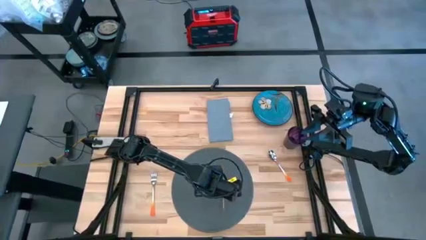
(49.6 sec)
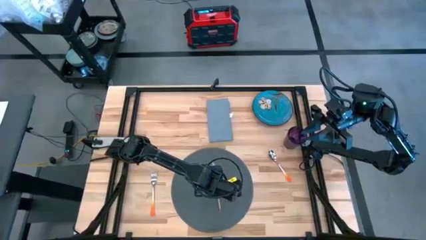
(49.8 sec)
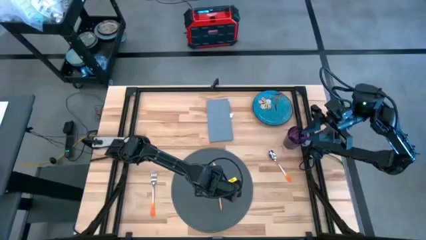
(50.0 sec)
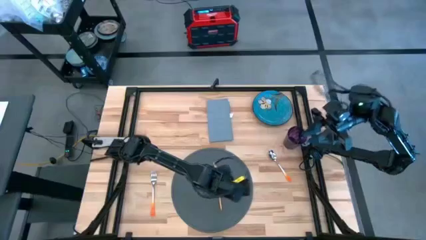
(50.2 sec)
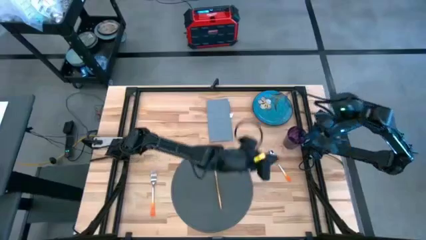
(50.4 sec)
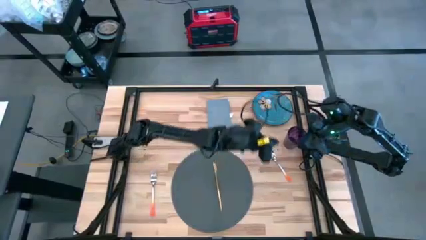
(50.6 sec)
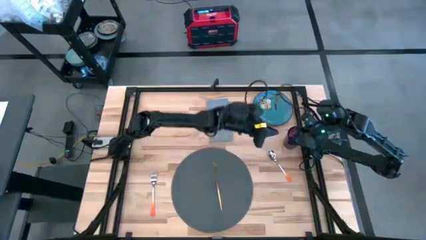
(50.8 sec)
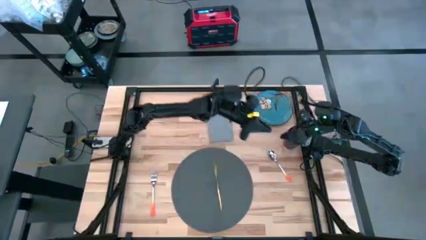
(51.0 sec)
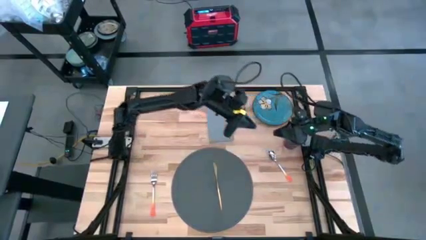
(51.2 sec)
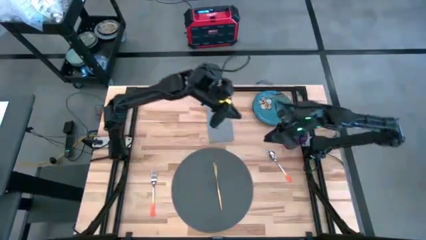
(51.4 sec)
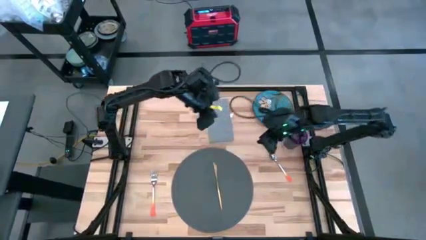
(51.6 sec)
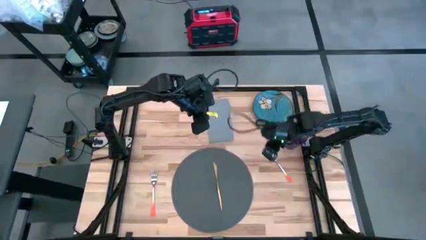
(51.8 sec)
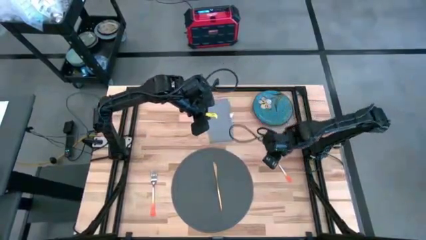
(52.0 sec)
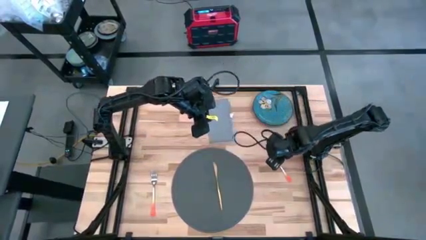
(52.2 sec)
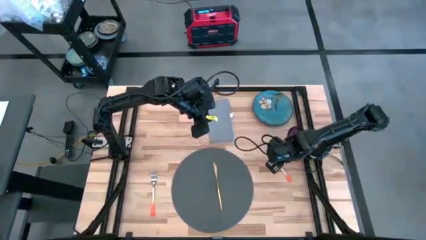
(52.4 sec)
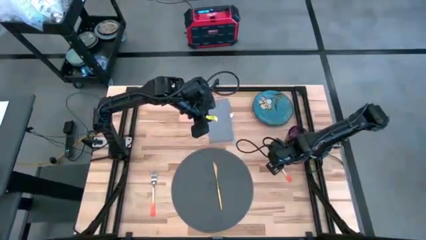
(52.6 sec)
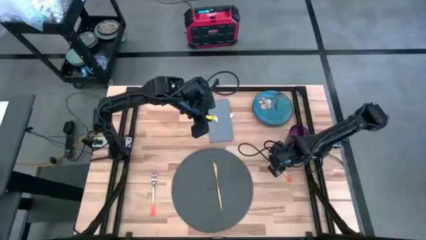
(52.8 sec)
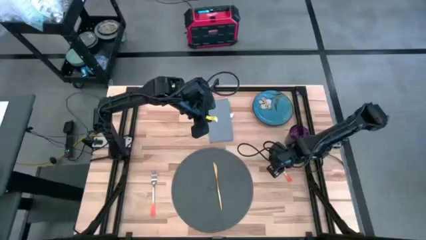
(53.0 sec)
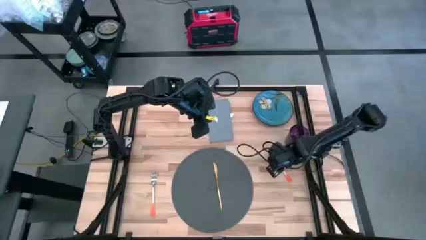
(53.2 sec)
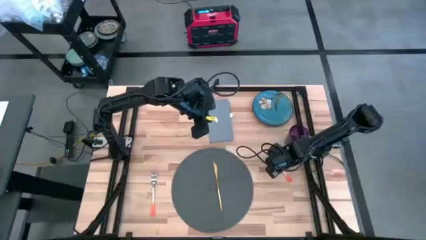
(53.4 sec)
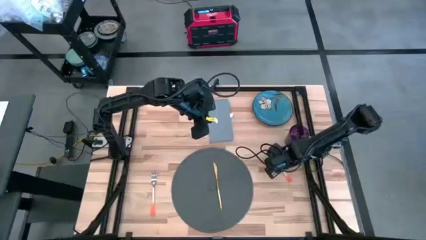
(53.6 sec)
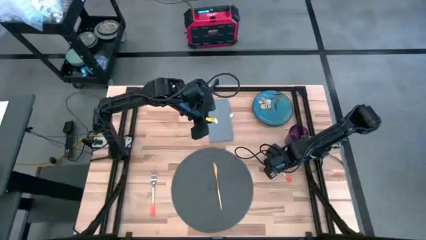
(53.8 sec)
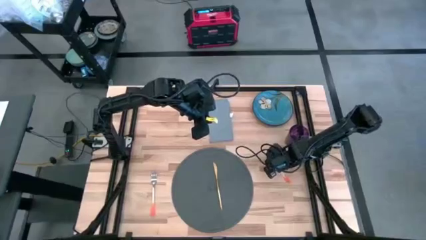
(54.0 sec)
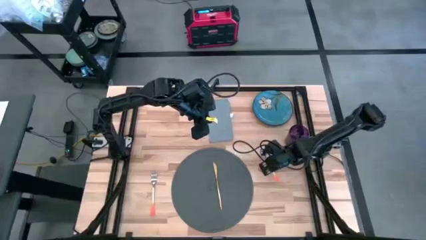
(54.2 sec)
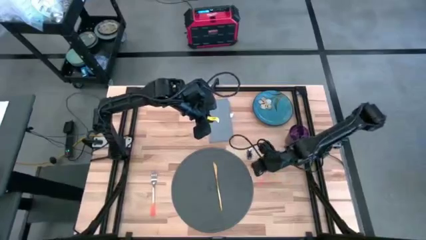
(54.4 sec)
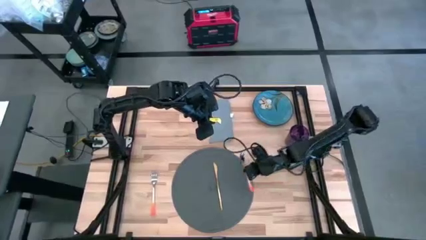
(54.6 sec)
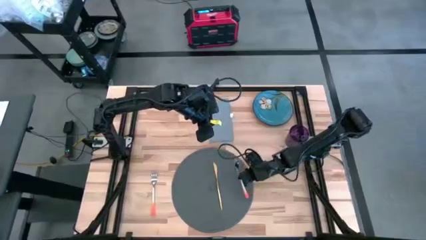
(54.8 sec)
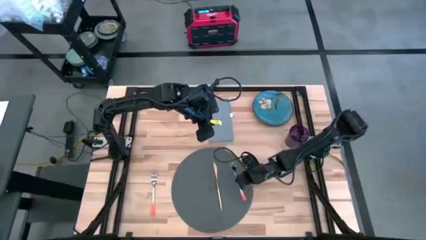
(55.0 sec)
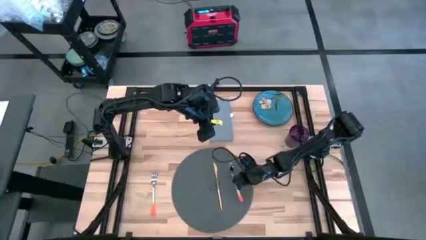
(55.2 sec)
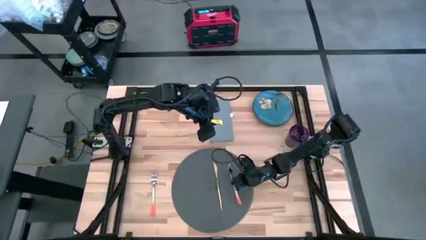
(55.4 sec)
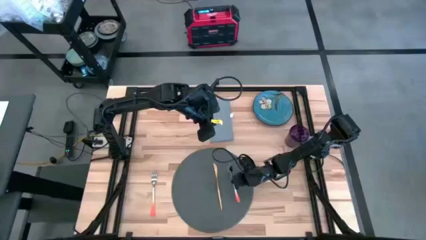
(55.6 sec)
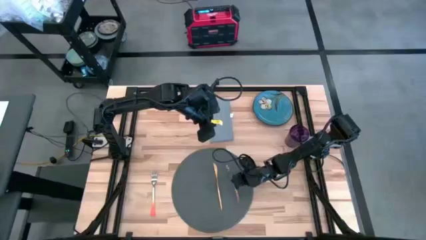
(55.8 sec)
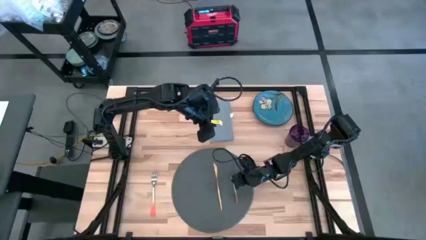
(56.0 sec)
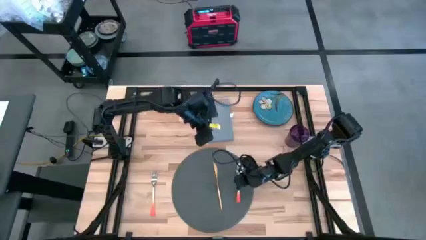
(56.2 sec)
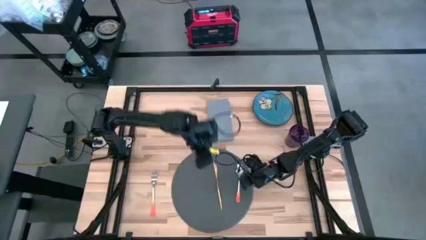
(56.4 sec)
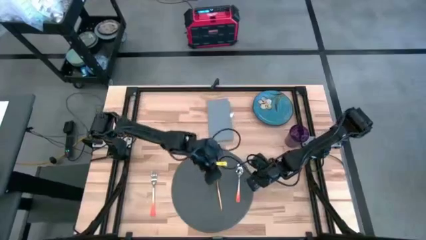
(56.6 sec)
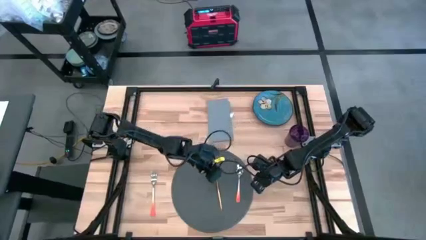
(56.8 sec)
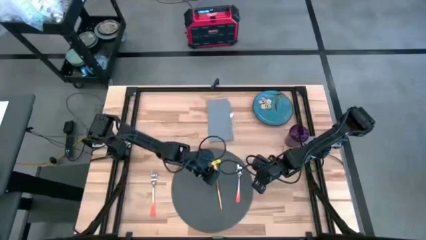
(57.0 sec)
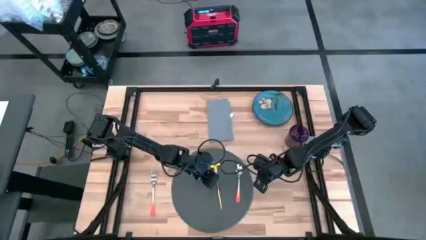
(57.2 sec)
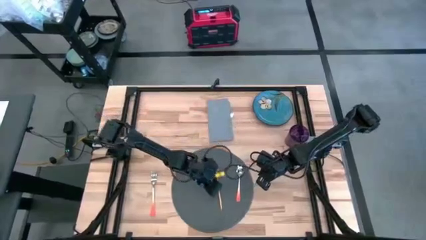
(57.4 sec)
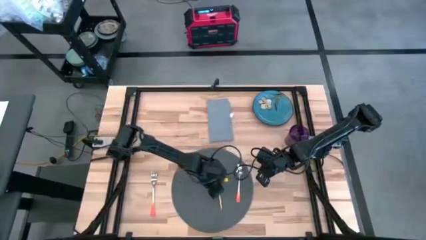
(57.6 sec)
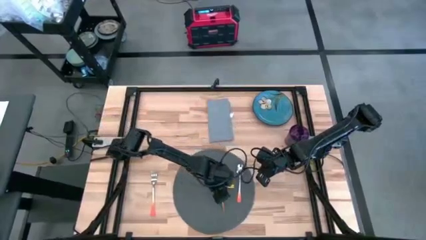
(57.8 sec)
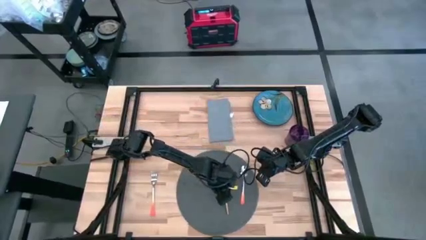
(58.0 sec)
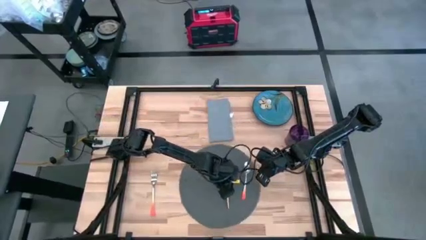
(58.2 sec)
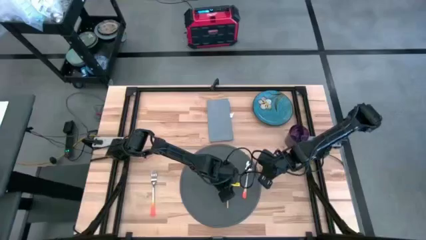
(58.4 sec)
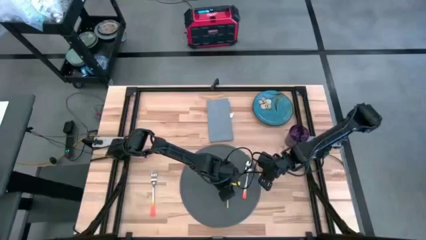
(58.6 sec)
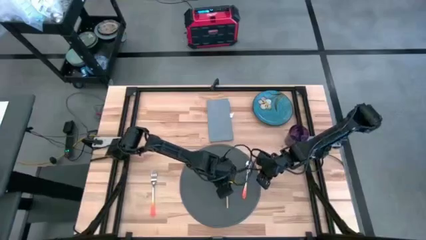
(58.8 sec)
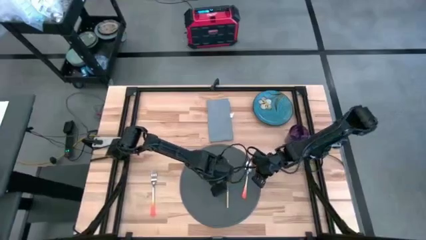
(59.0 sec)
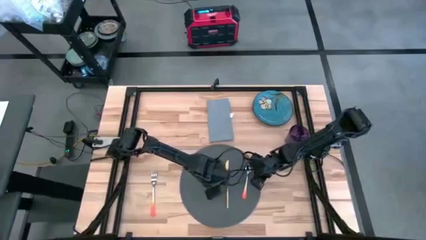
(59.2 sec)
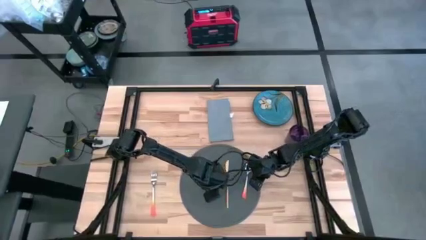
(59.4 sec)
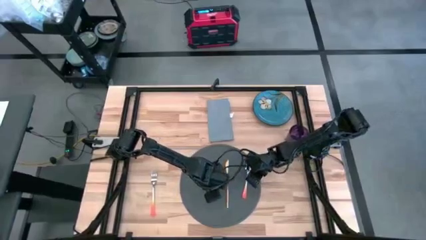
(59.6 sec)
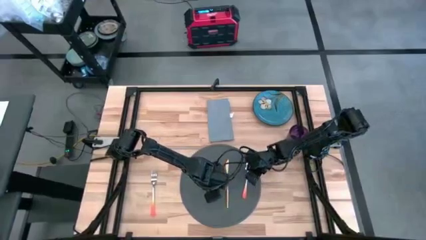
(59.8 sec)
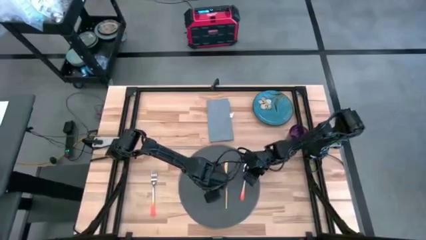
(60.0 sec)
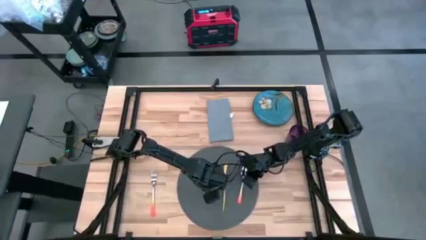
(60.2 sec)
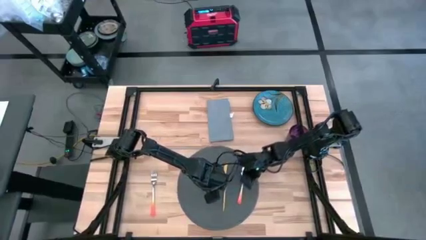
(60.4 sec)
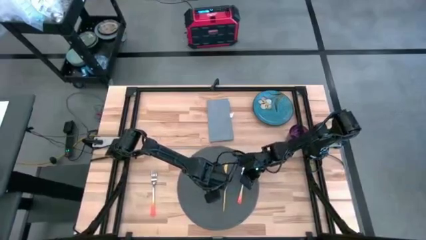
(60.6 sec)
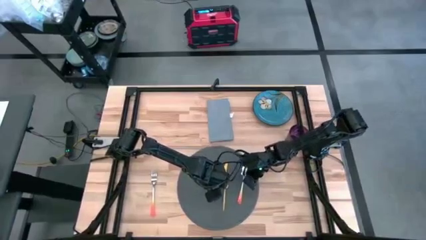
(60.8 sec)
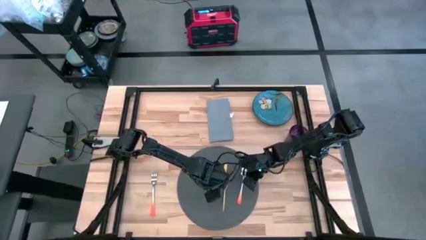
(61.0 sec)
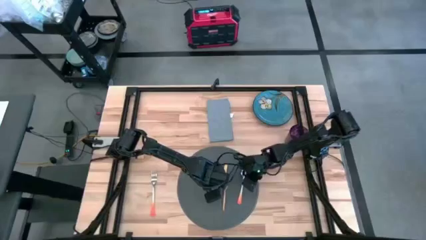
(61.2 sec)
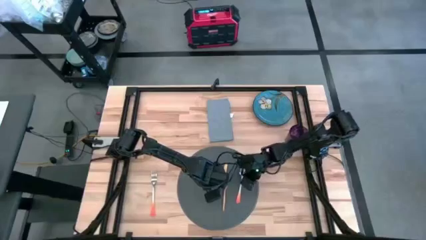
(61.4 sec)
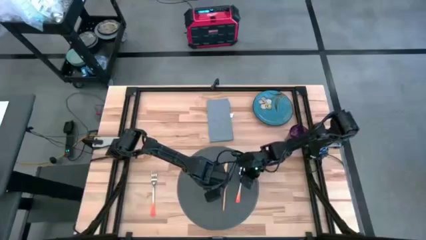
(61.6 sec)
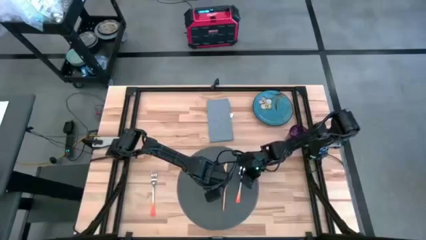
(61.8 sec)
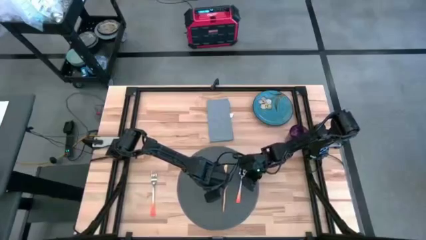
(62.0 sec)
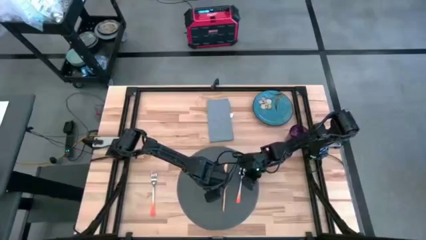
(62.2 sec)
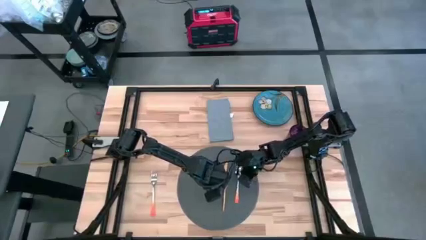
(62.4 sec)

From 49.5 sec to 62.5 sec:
Task: Set table place
Put the orange spoon on the gray table mat

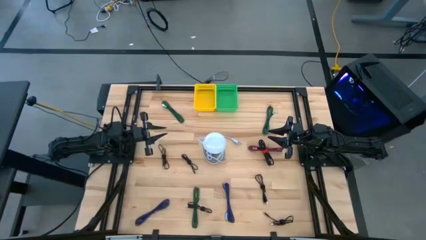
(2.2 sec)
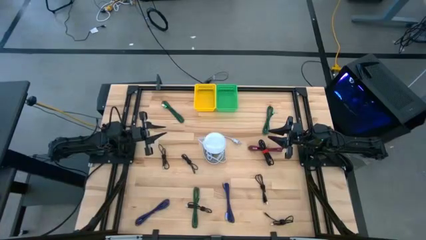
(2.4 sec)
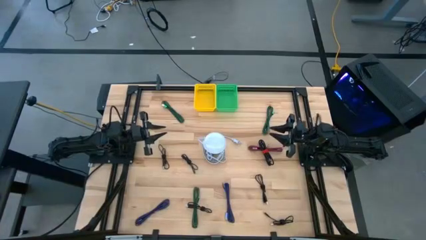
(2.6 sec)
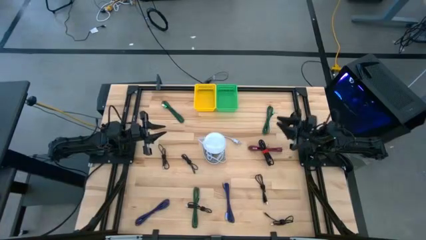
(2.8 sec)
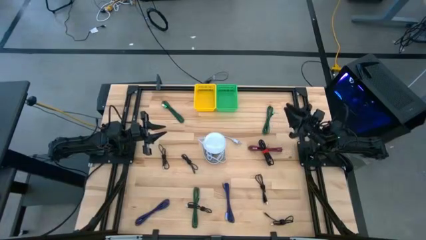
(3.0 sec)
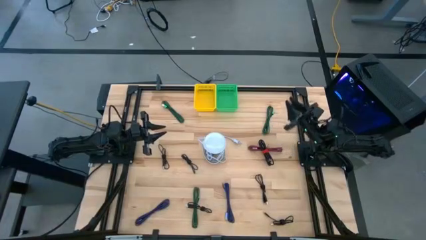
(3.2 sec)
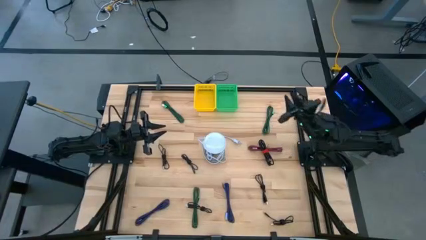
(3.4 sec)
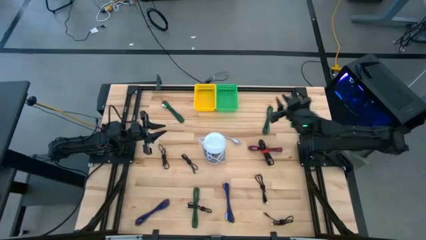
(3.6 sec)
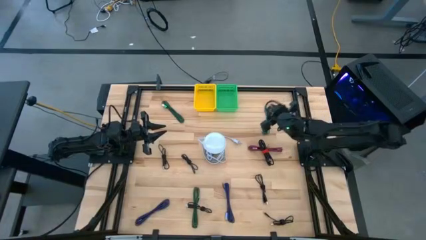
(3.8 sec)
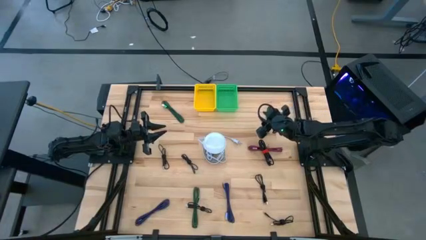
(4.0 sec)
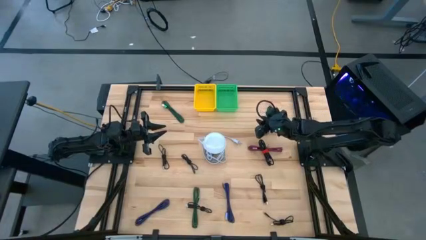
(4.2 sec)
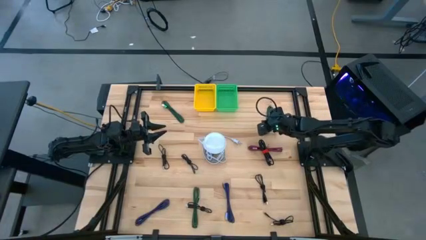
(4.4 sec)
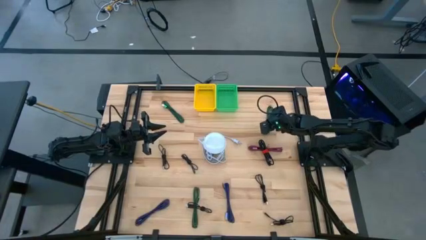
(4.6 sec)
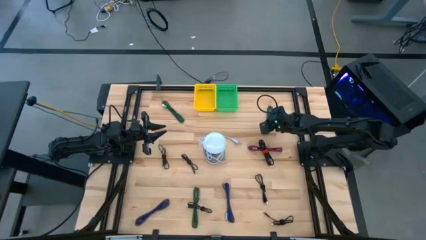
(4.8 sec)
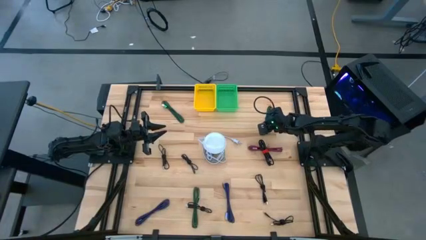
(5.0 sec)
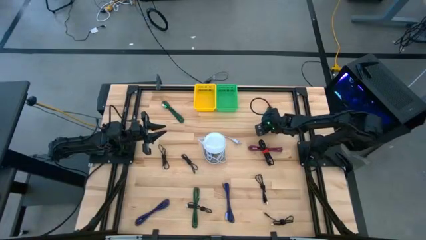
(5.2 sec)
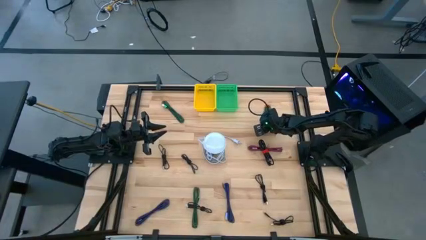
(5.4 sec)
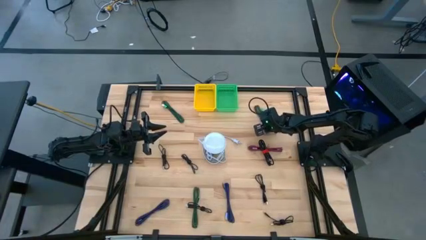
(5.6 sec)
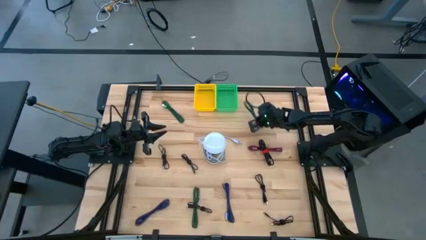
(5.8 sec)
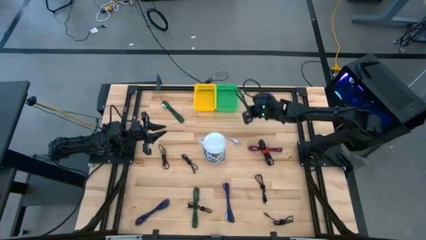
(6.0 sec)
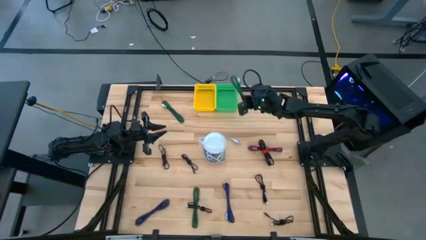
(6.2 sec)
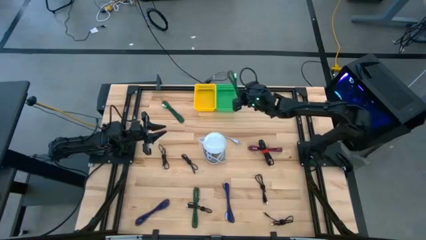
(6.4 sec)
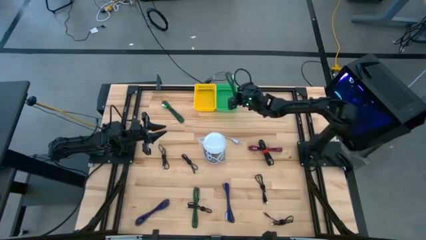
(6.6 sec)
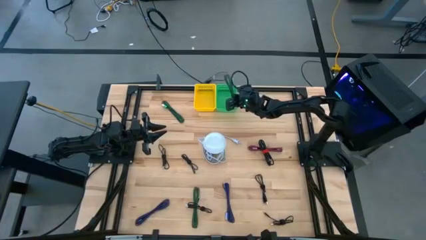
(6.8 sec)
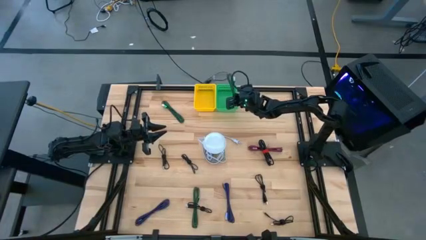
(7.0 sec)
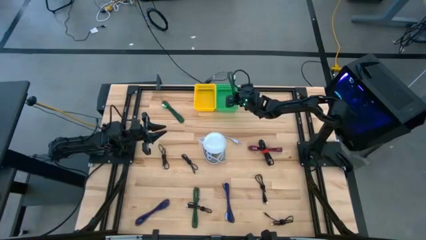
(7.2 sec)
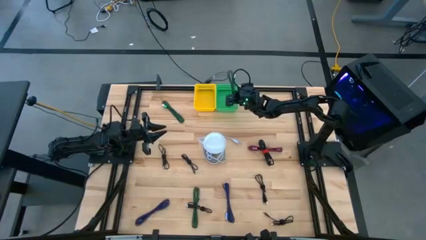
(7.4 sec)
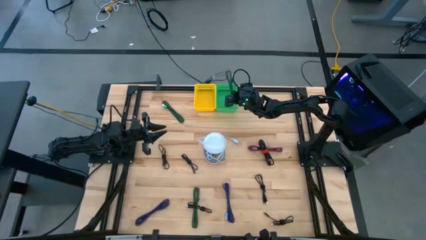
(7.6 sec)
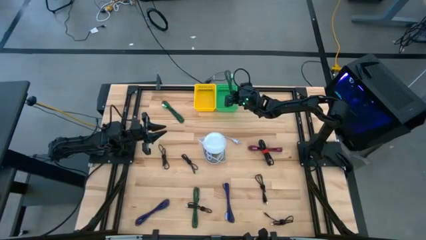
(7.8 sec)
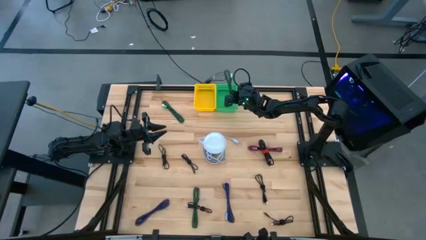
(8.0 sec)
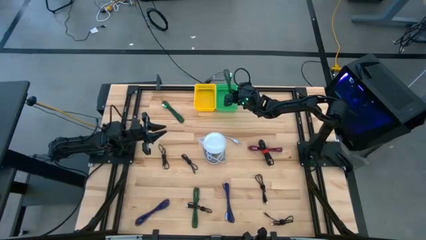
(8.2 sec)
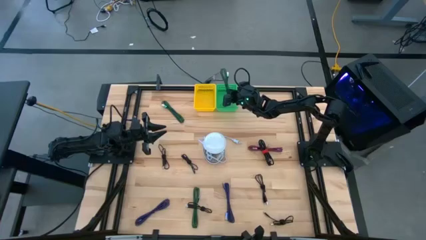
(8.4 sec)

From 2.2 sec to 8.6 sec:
Task: Pick & Place USB Port
Put the green charger cable into the green bin
